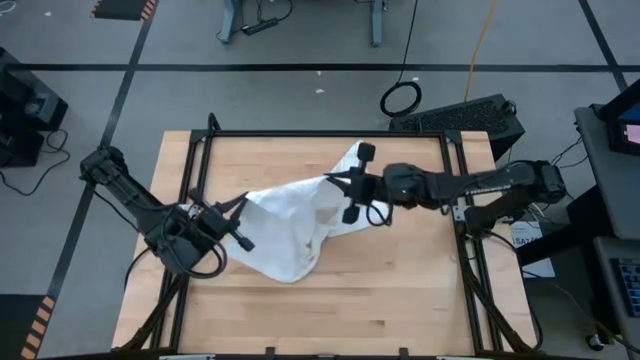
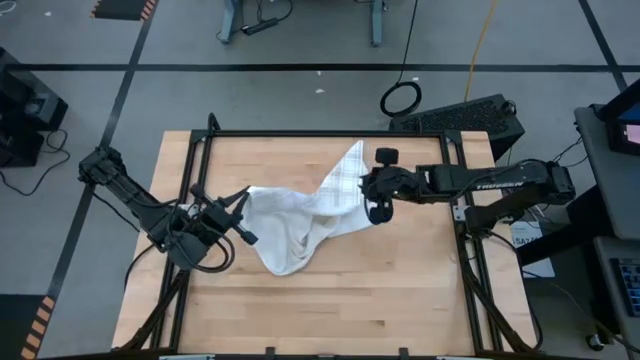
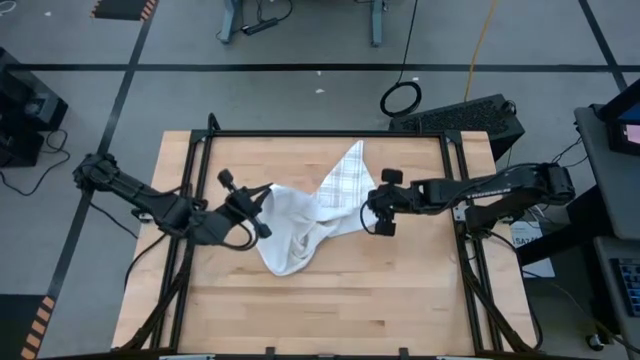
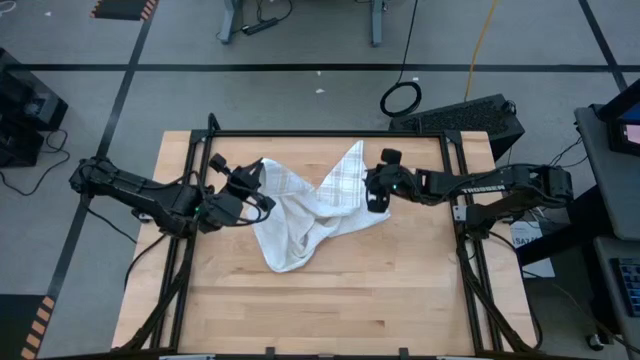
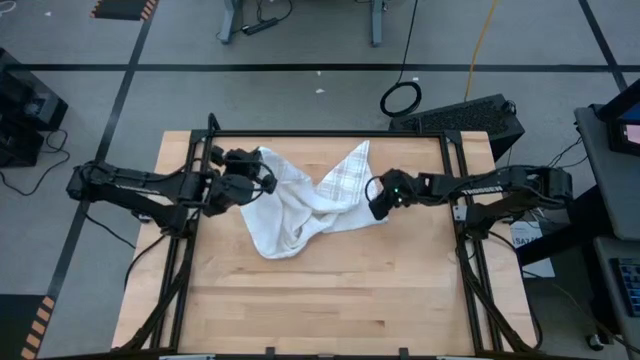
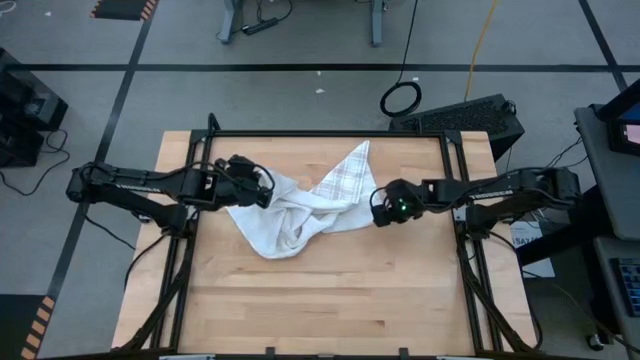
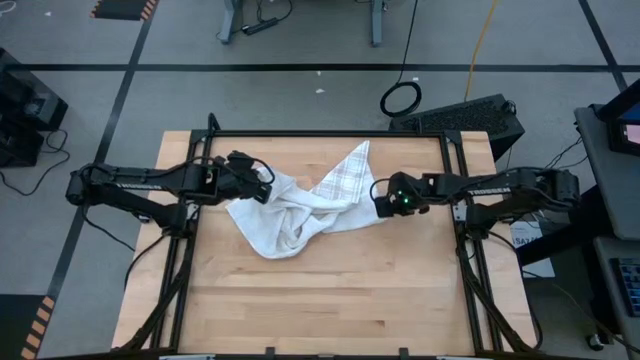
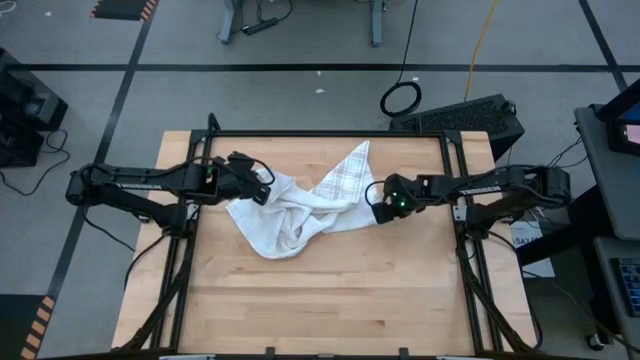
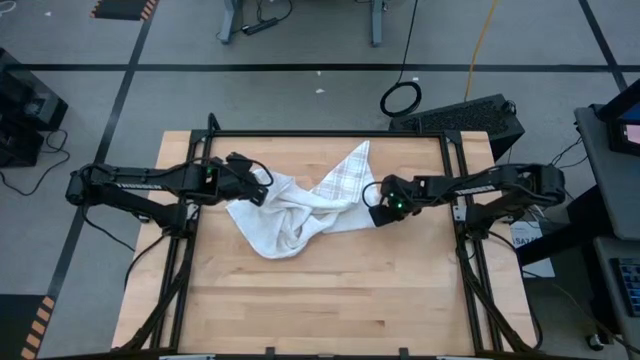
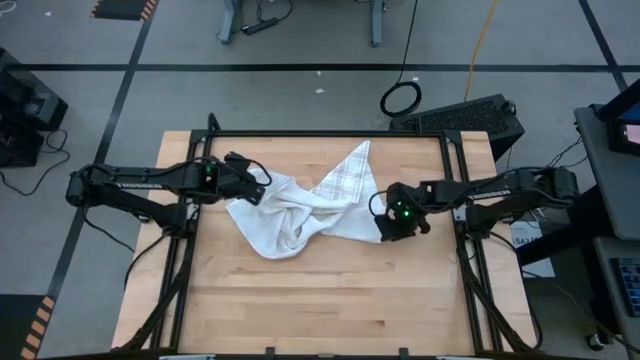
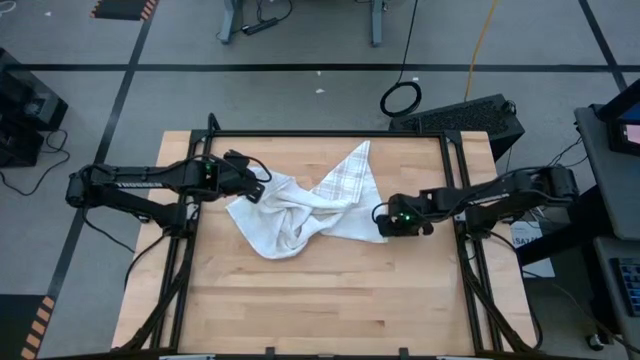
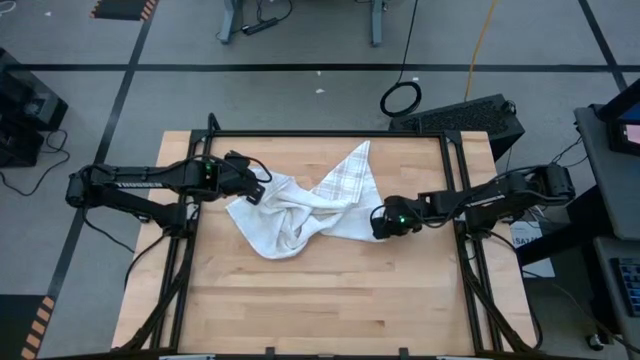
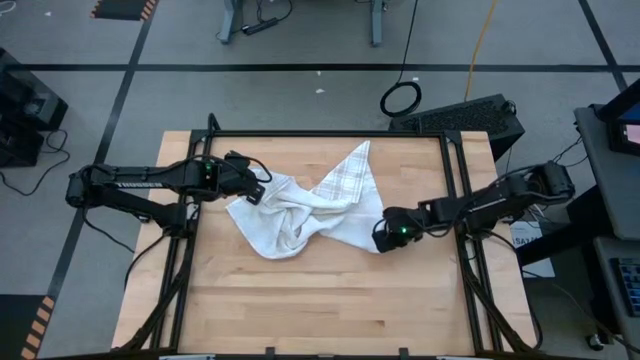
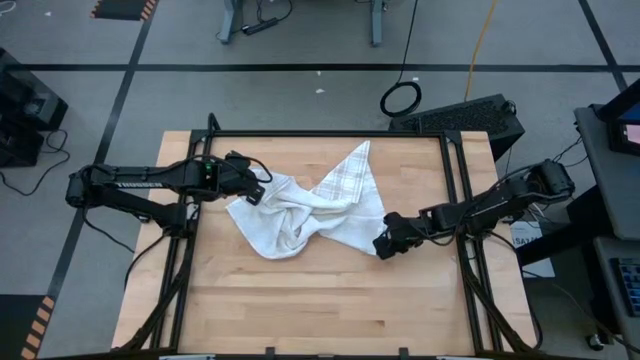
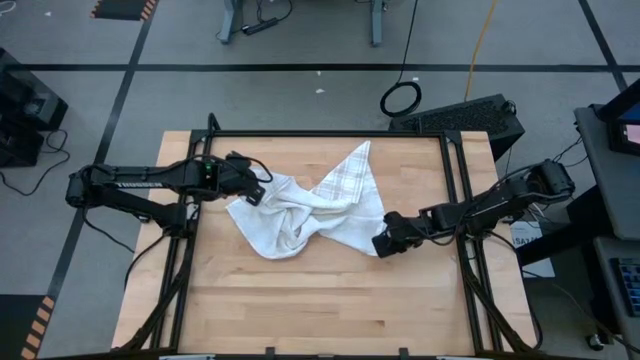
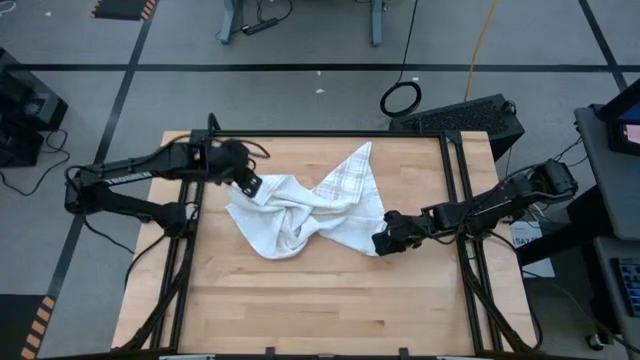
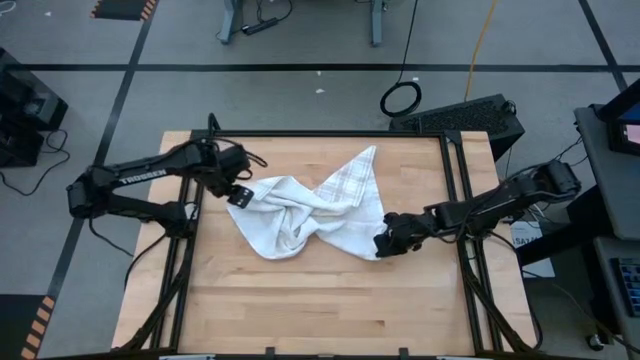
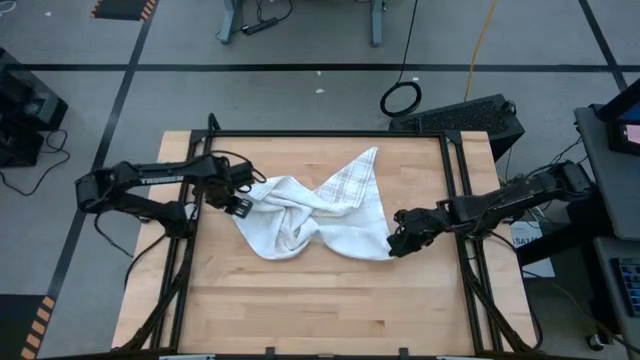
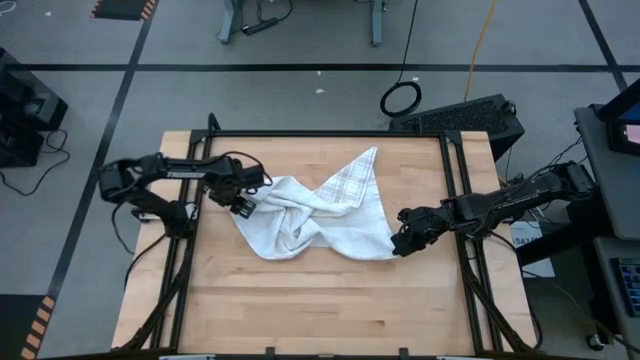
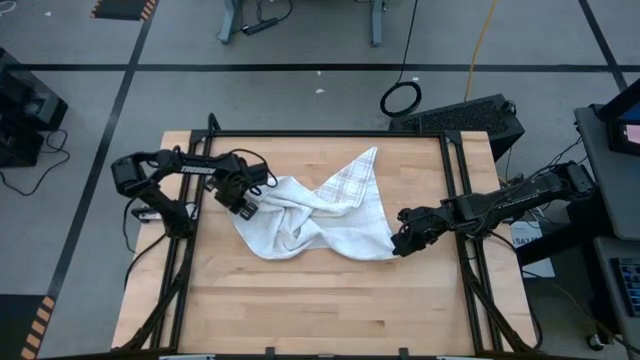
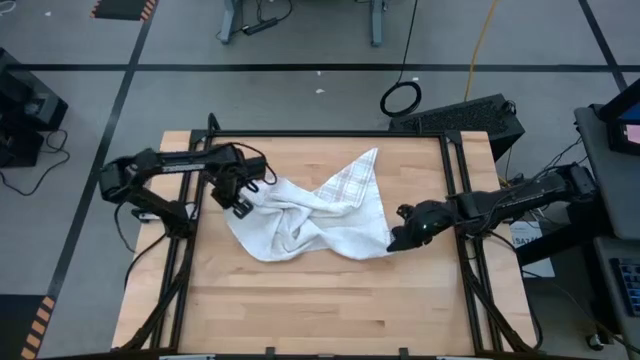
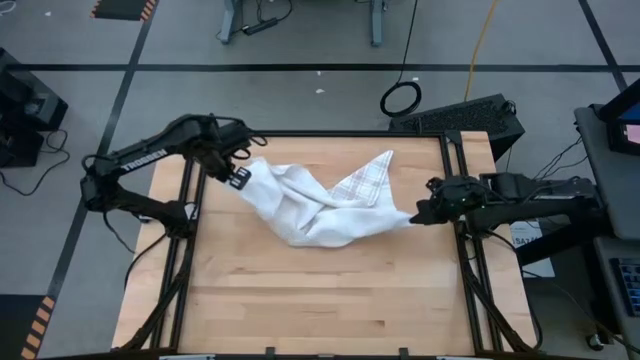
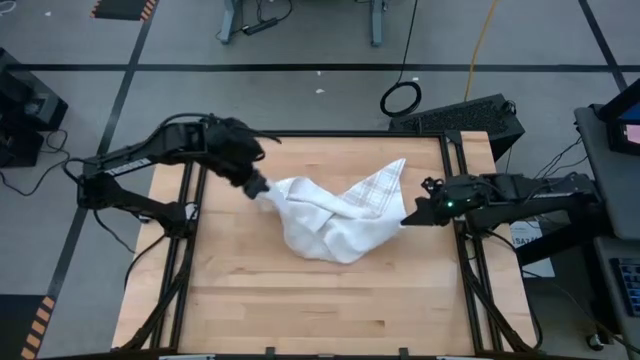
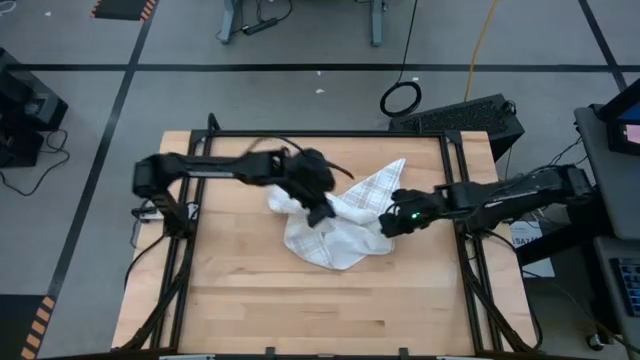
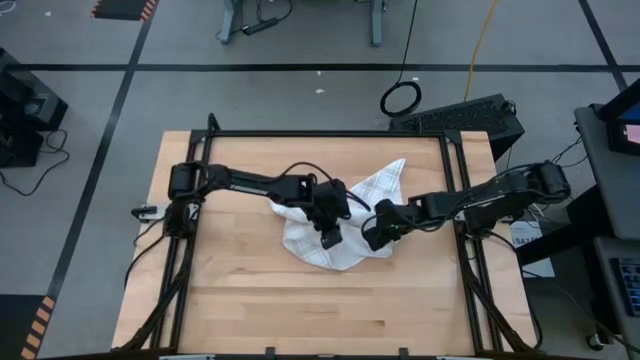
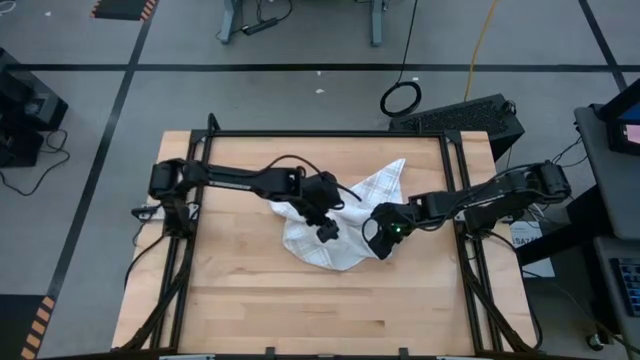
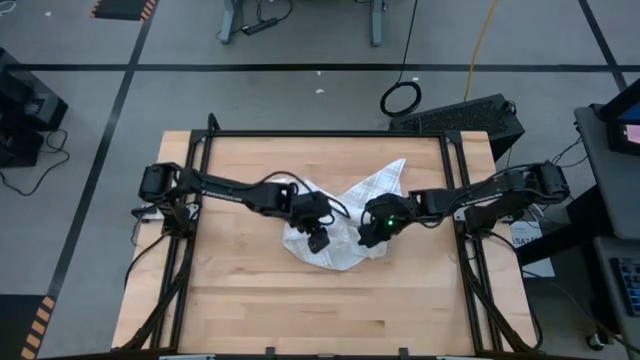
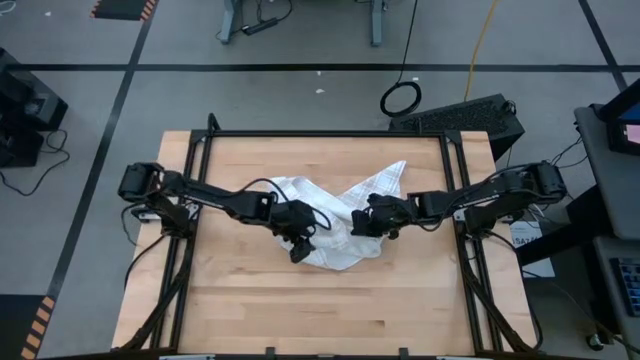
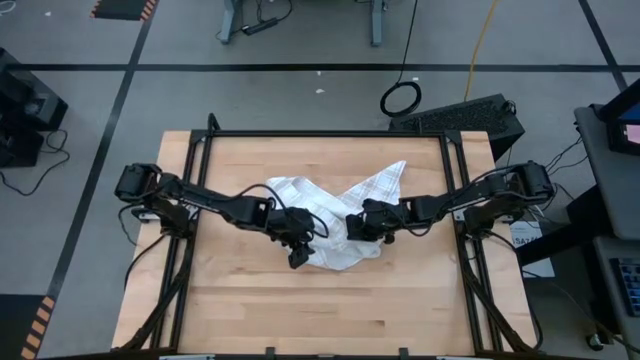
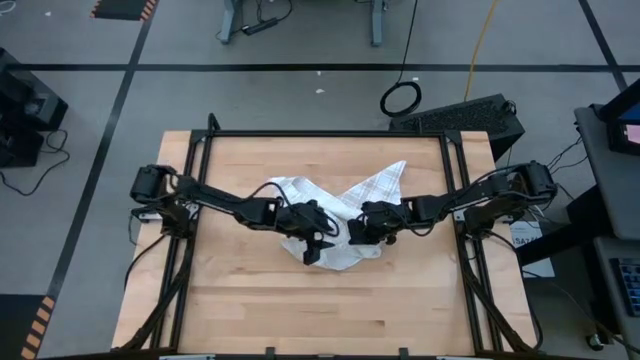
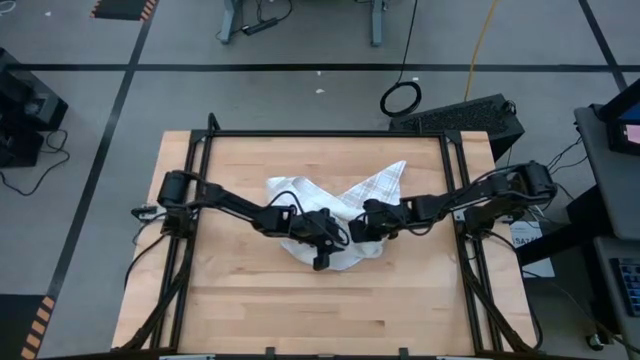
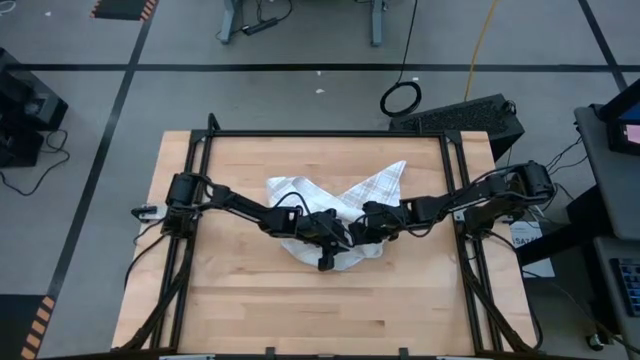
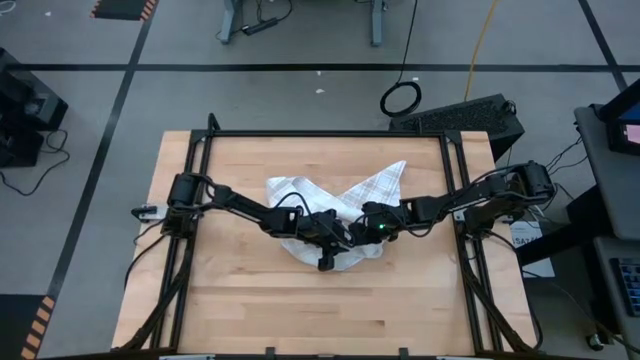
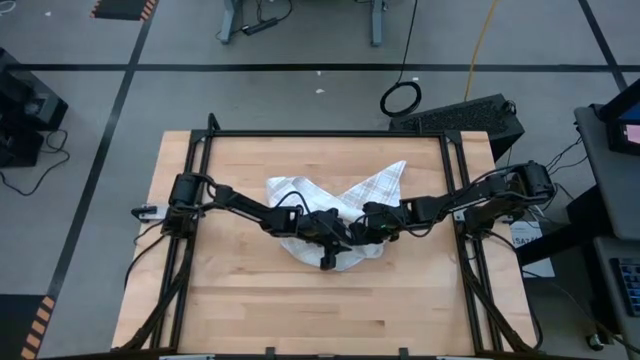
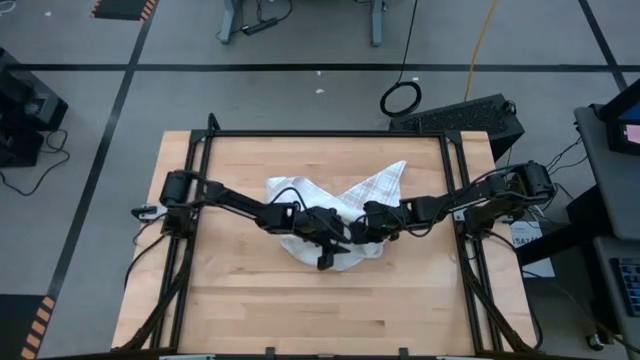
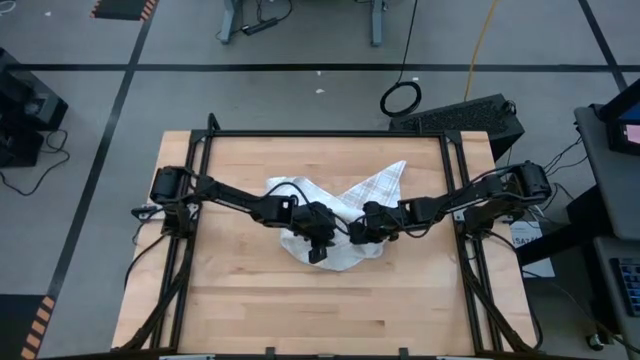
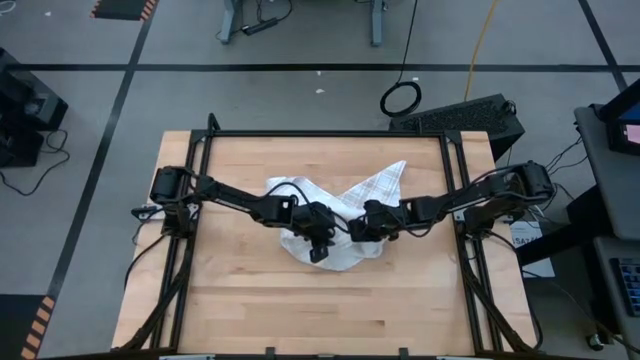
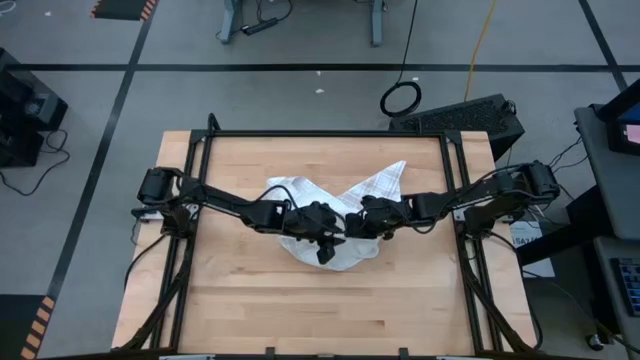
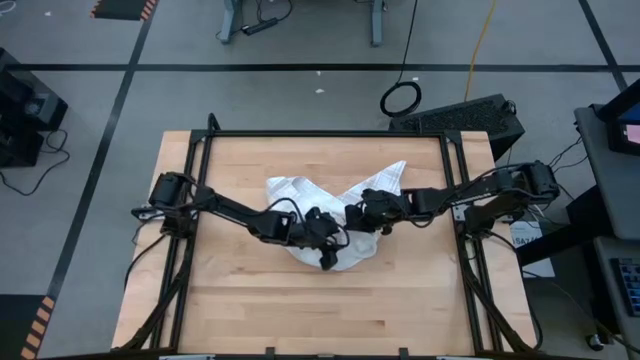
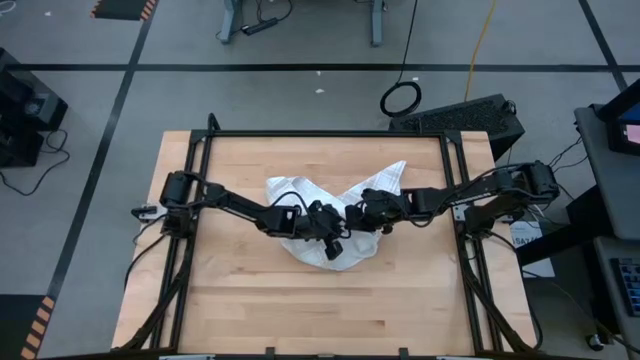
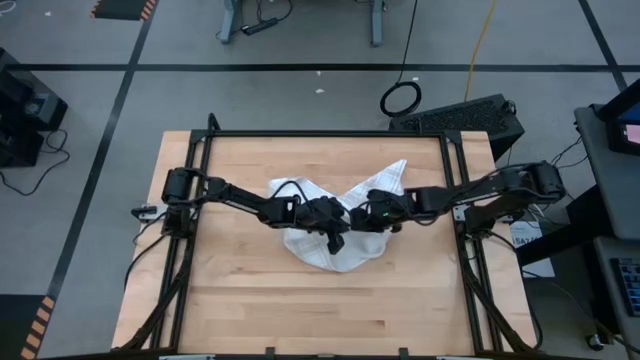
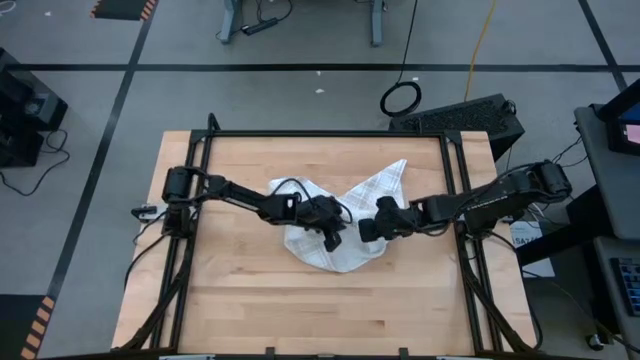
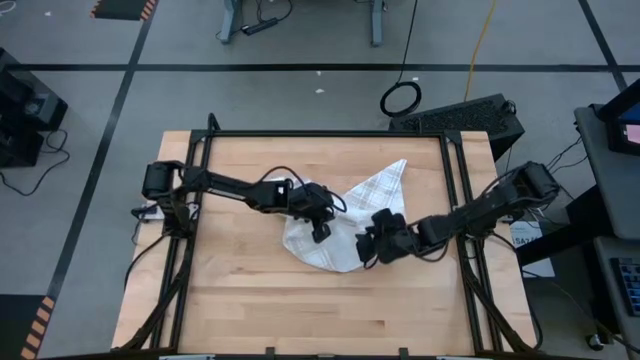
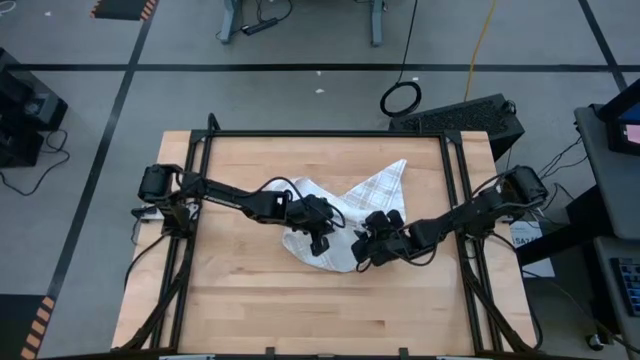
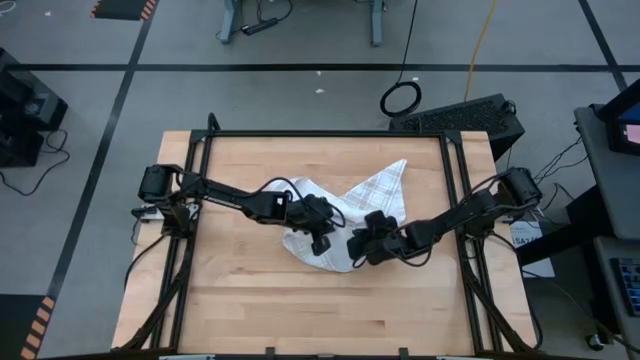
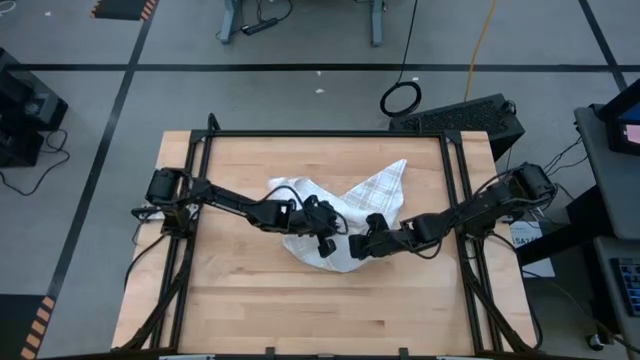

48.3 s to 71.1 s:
Task: Roll towel
Roll the towel
